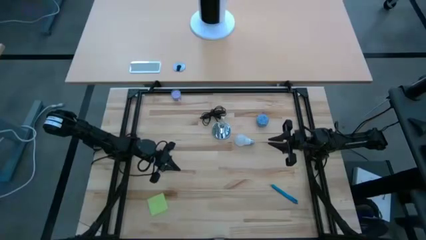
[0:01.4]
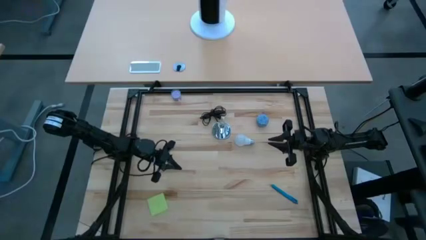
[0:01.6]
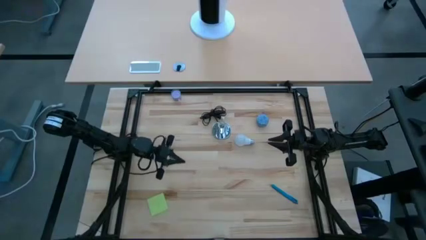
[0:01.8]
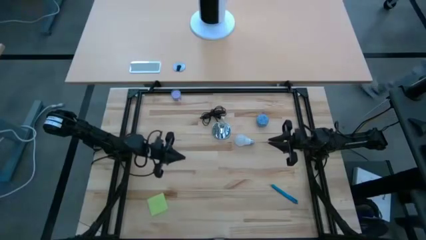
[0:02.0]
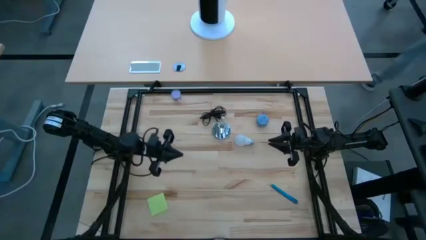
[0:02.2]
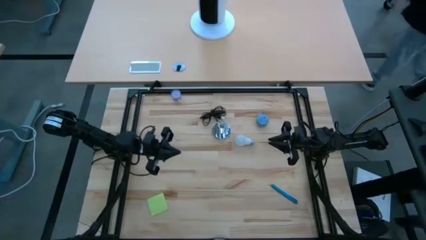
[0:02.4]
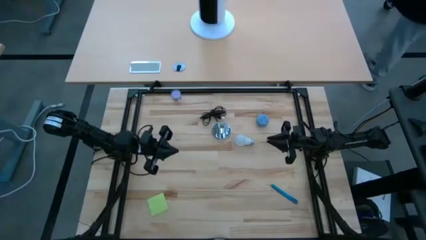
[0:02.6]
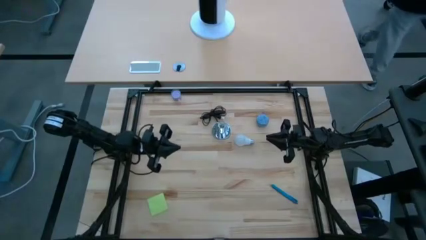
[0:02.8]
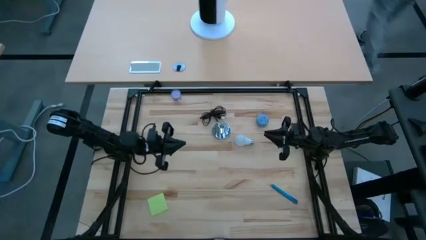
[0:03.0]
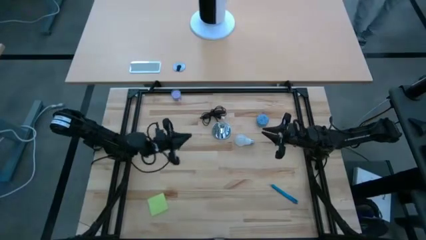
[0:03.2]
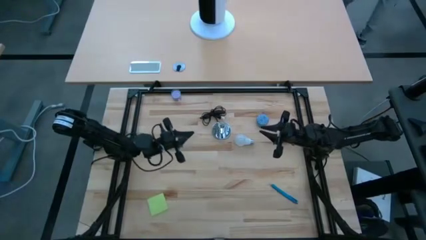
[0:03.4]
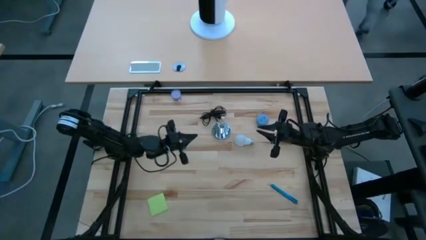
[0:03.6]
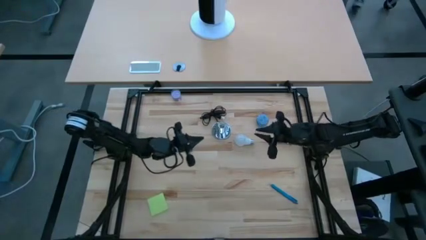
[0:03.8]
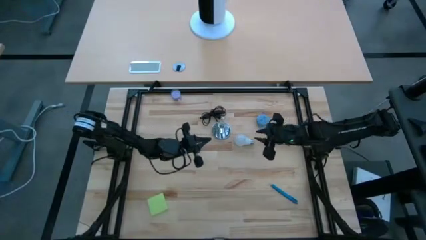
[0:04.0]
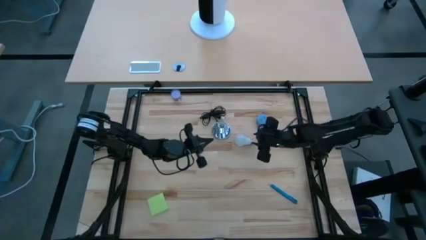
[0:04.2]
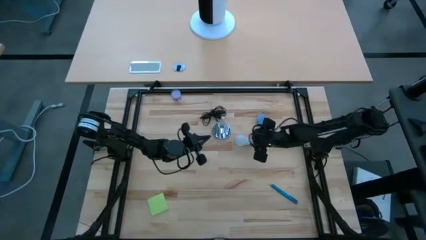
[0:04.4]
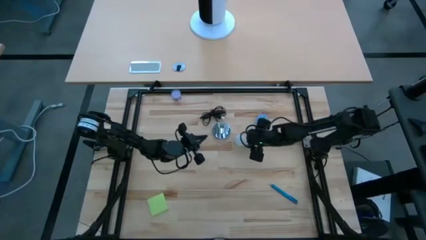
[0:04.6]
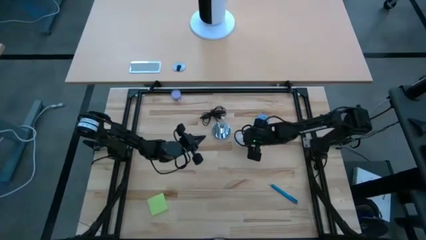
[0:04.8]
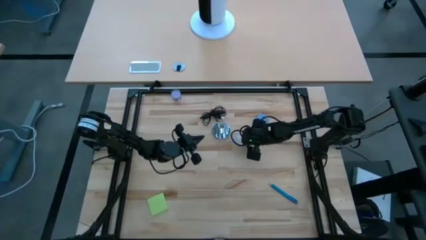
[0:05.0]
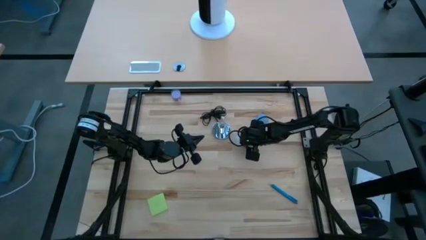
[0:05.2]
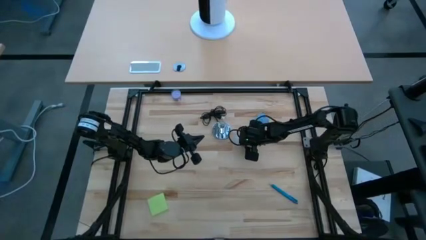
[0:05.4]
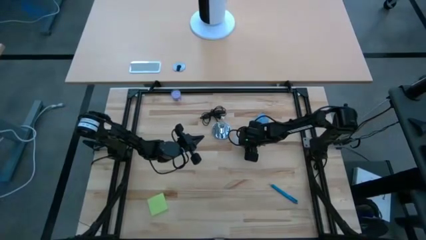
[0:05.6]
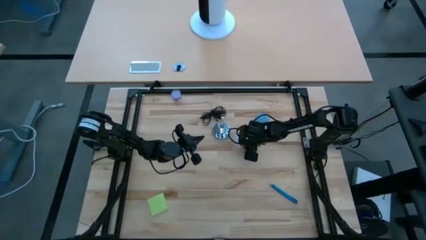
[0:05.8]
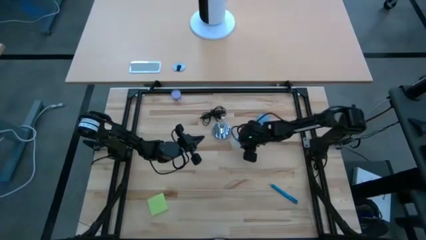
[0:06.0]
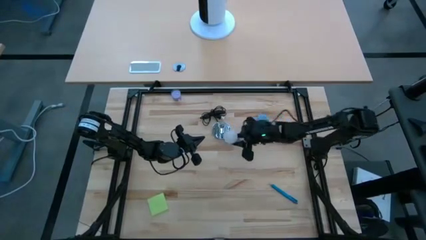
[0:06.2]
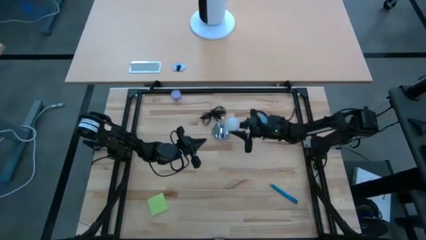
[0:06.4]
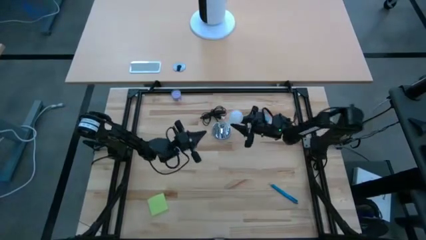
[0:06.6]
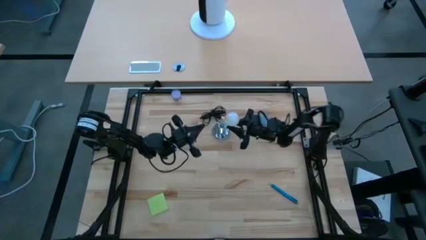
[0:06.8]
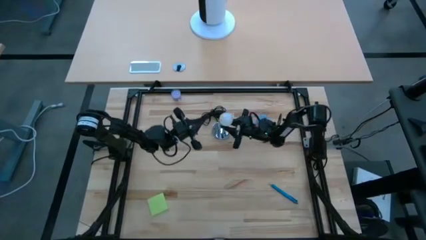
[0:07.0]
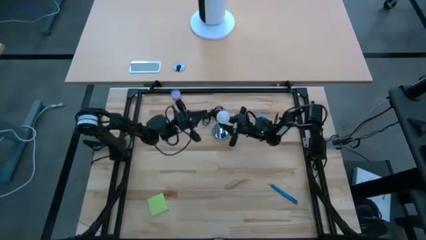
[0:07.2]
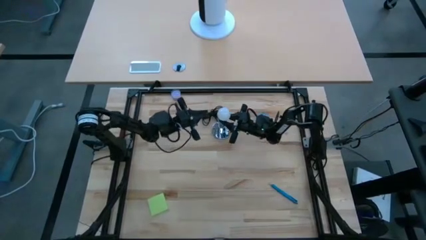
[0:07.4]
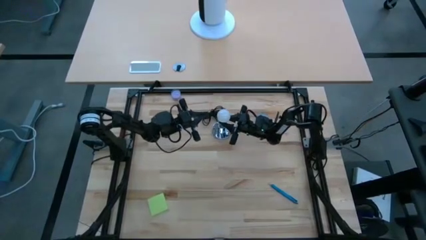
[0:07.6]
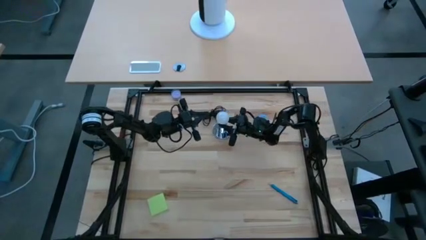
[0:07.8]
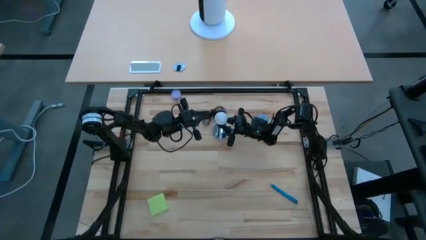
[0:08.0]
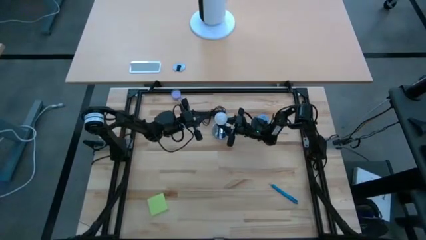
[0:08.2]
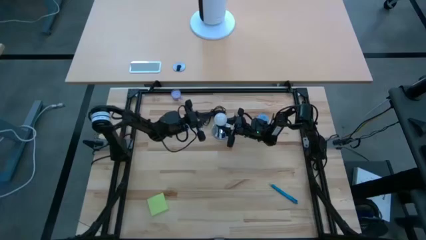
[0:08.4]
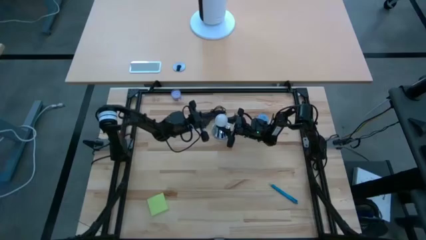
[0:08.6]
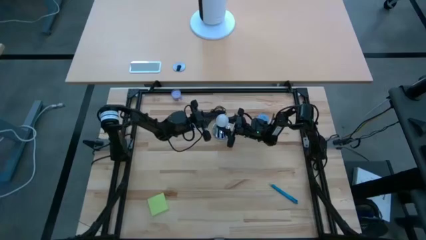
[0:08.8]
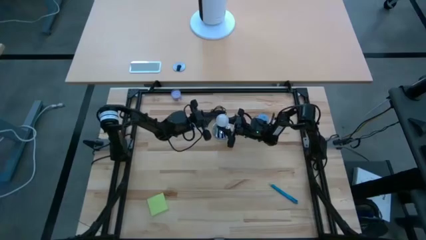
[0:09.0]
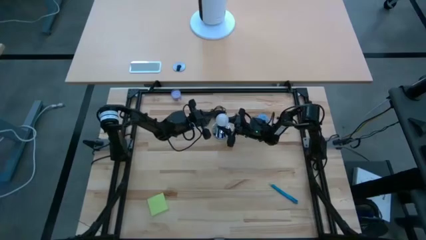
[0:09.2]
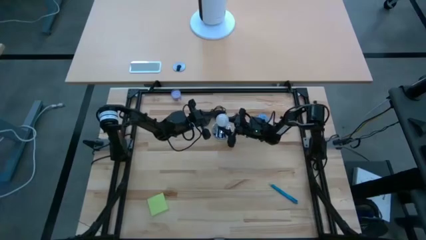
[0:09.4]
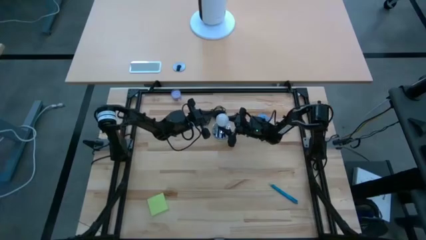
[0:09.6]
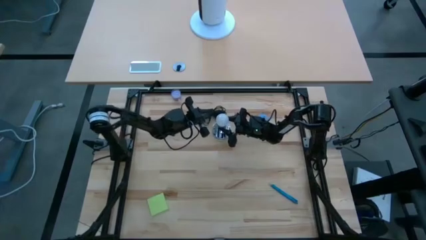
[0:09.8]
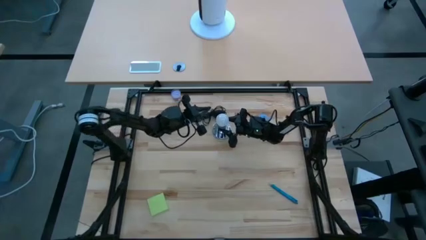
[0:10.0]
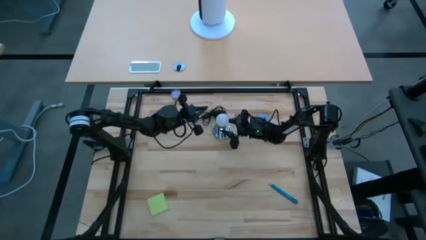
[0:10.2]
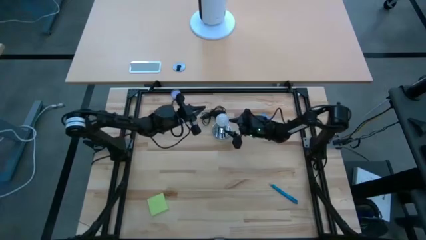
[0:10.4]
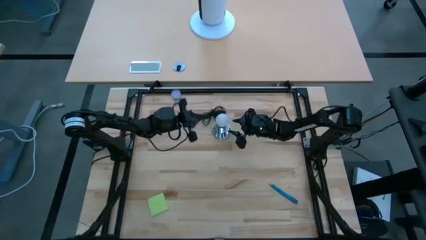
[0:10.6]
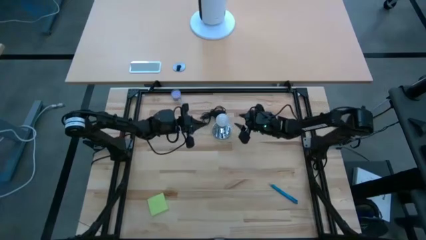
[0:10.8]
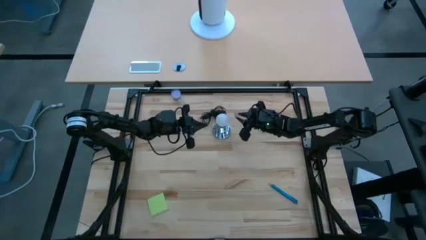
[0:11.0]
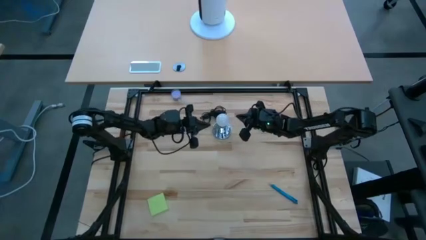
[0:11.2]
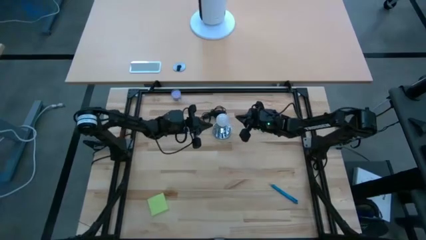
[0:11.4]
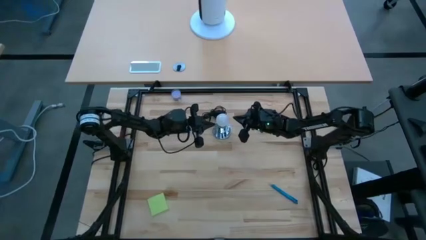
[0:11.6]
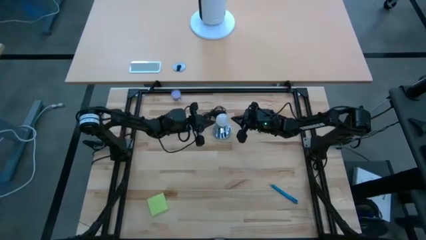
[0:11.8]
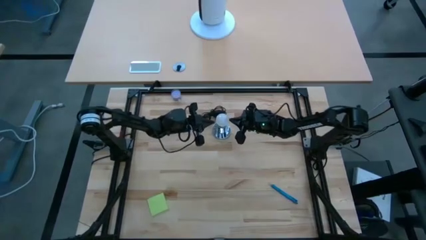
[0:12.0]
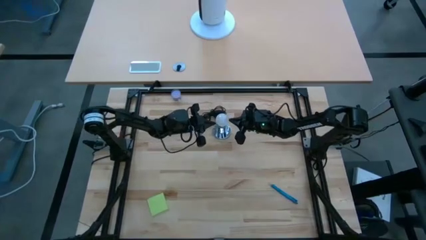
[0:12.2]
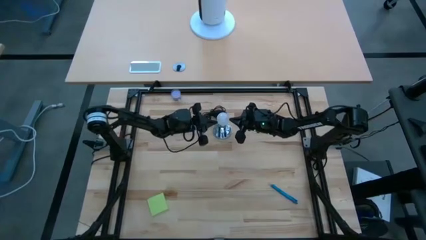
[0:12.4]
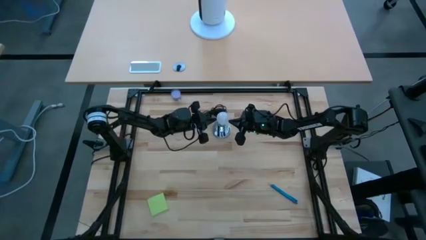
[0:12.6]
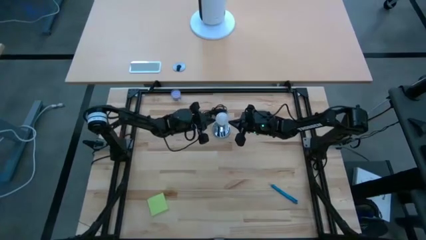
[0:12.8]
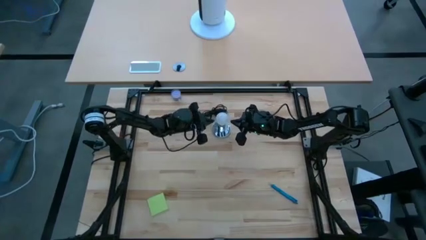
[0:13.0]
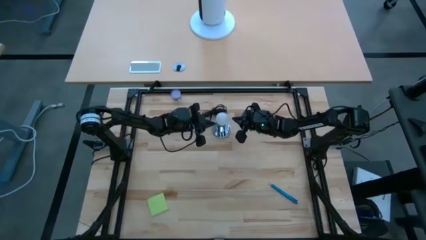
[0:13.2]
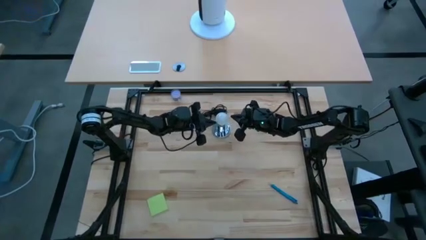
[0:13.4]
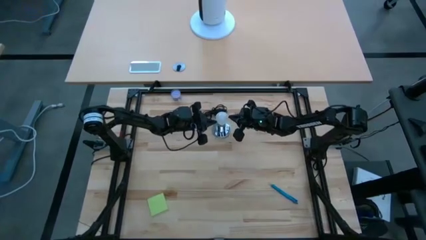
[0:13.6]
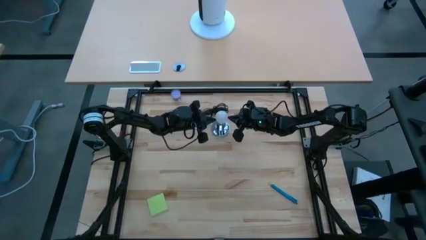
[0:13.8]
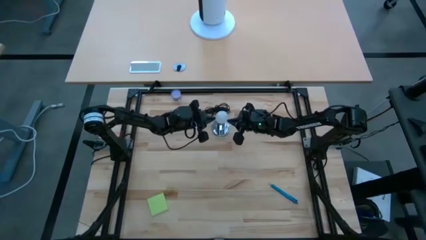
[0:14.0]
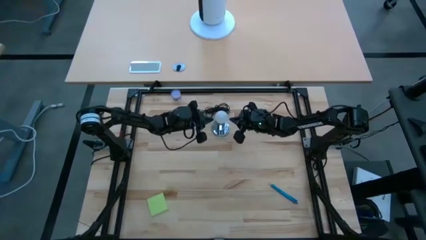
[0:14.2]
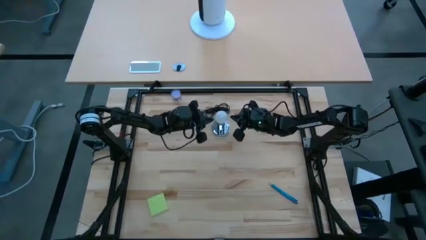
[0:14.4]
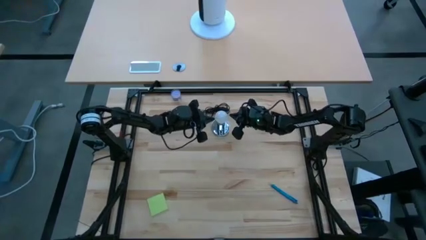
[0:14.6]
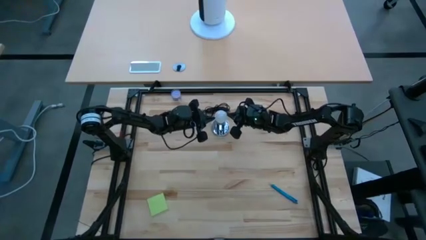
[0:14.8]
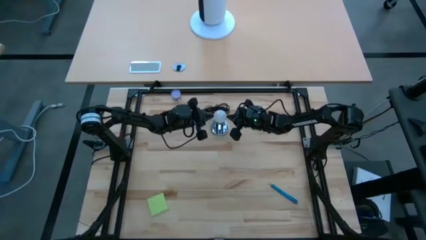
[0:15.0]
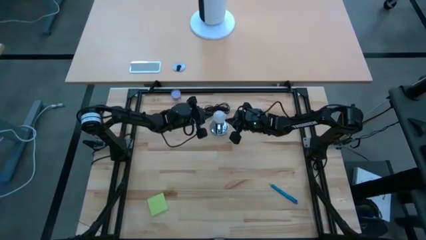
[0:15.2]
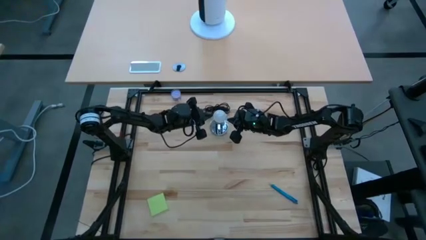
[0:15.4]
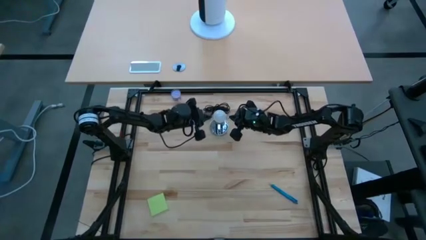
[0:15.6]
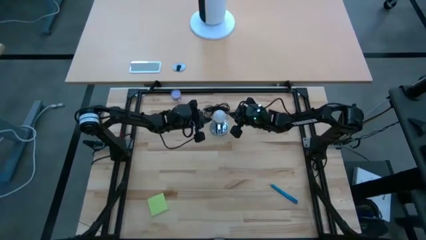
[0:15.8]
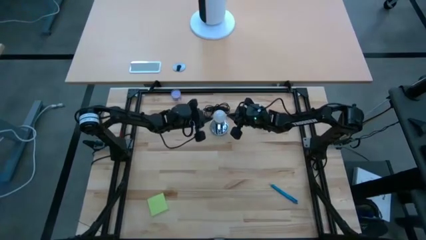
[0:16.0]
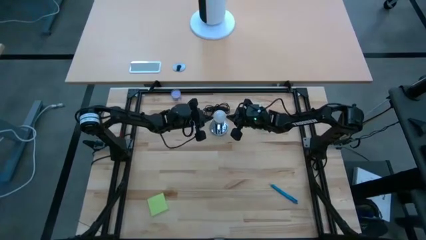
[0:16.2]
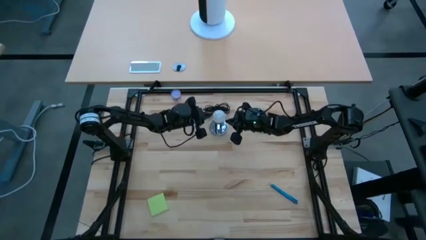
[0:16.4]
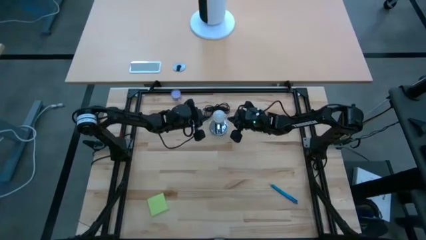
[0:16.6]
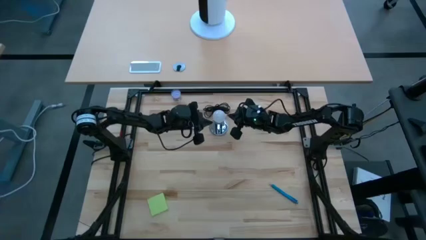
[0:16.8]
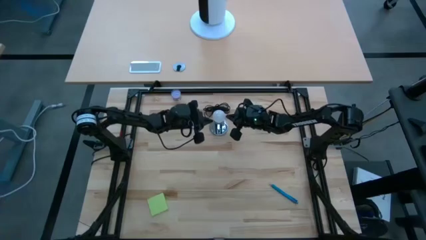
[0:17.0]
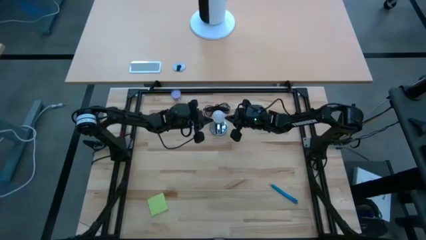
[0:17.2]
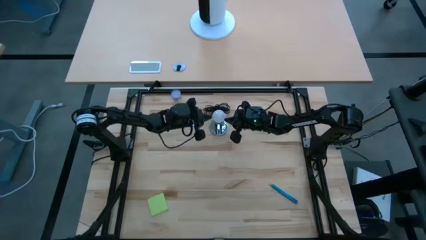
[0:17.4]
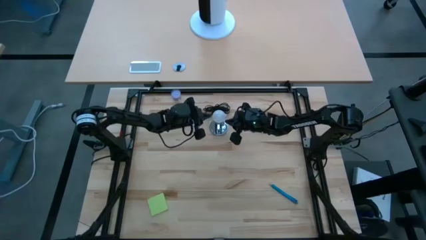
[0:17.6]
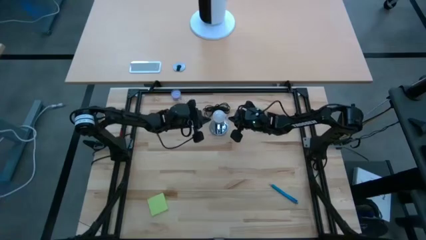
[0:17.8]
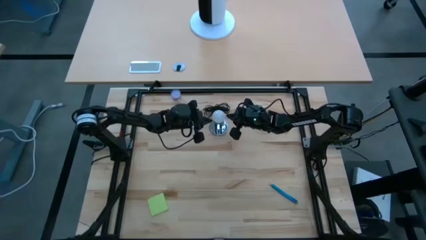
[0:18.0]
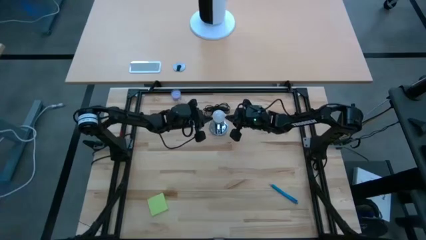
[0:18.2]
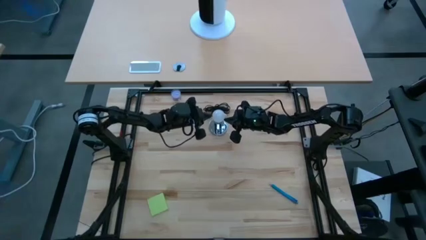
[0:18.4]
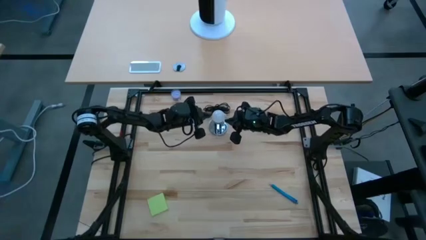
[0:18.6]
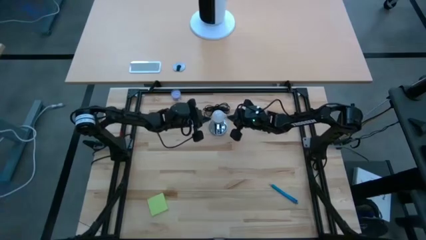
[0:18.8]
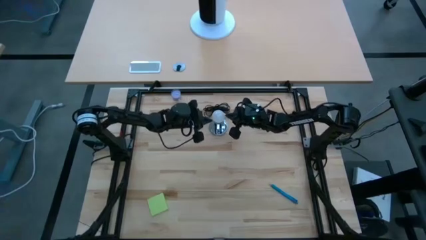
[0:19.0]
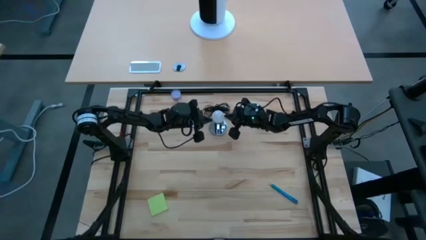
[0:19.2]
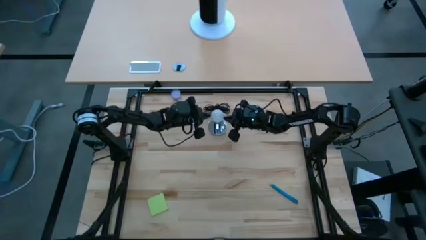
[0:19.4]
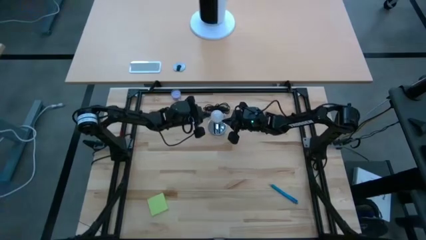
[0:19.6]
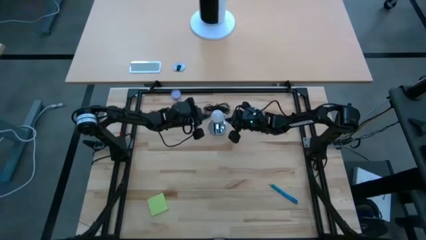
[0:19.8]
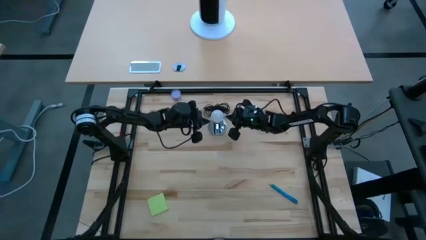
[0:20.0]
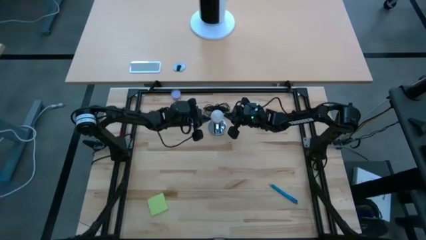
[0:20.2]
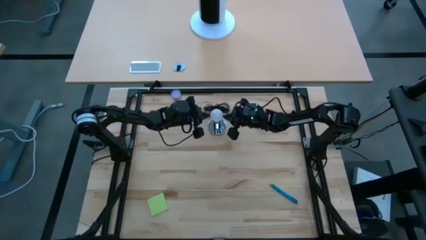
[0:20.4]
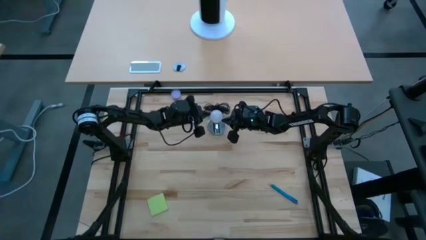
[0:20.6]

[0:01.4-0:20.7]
Task: Screw lightbulb
Insert the bulb into the lamp
